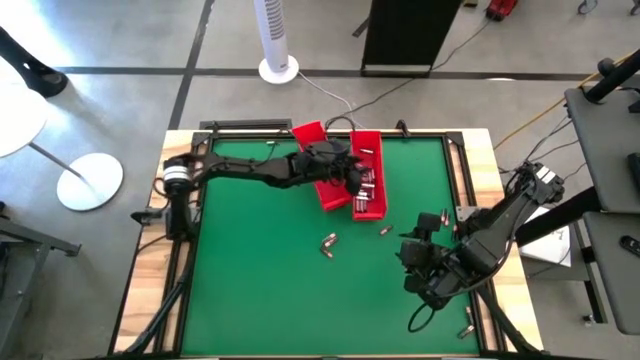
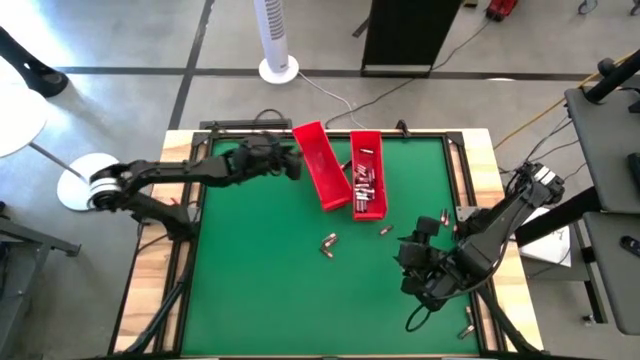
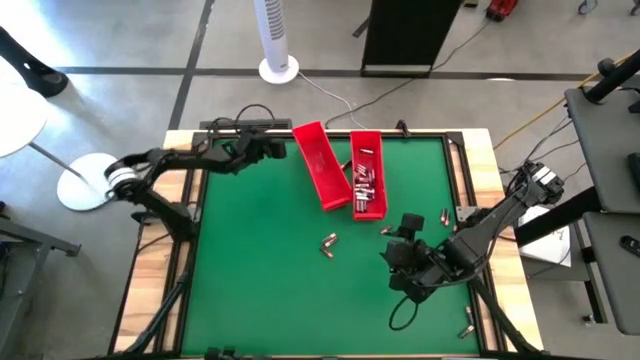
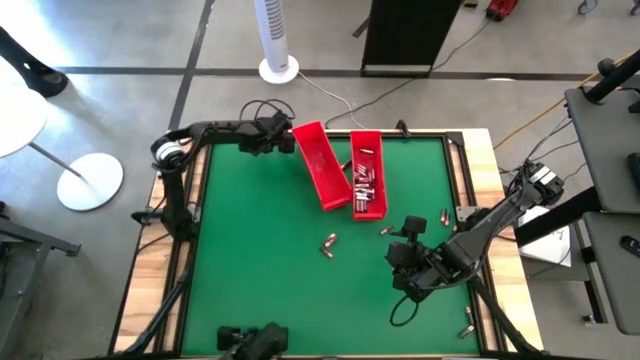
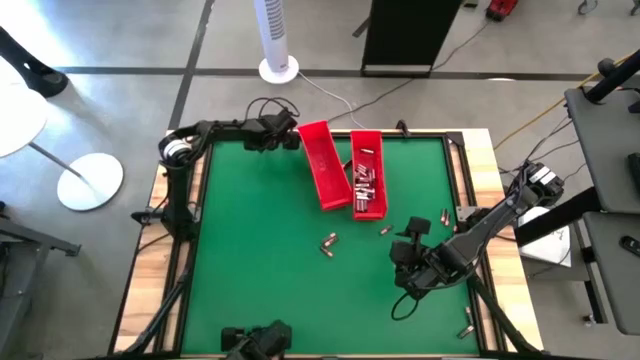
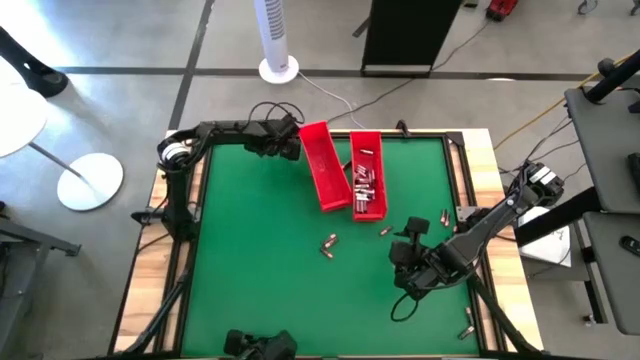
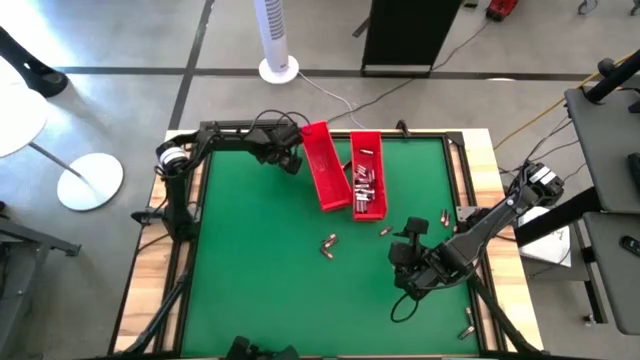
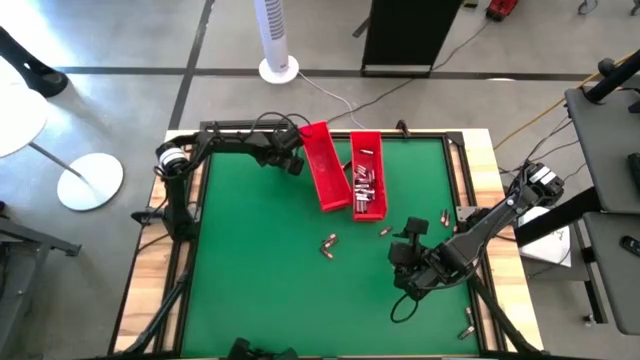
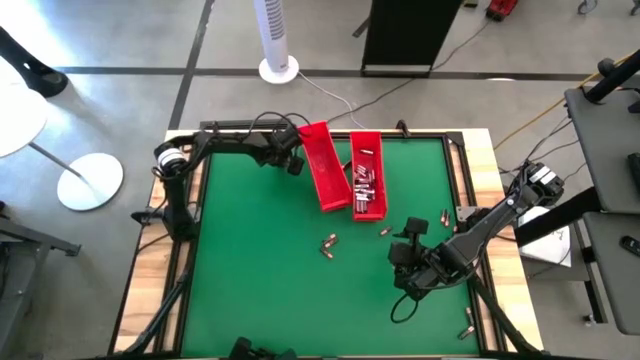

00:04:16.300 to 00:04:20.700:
Task: Sort batteries
Put the silver battery into the right red bin

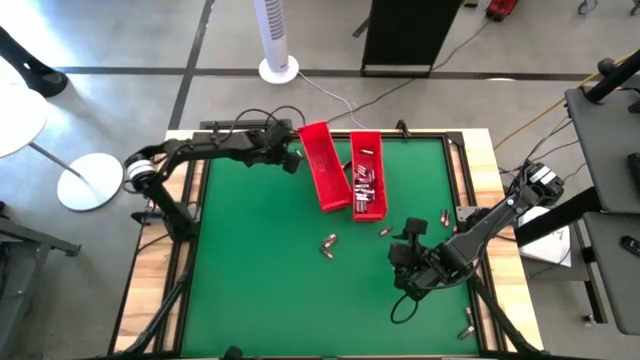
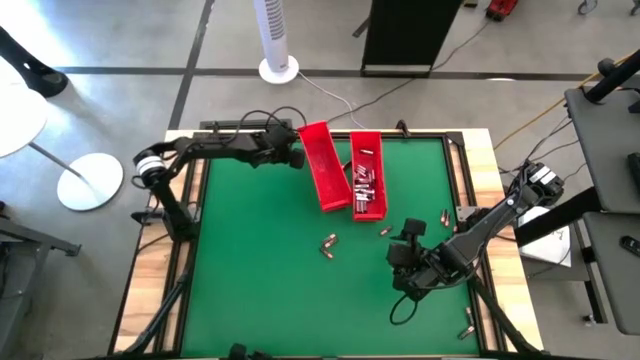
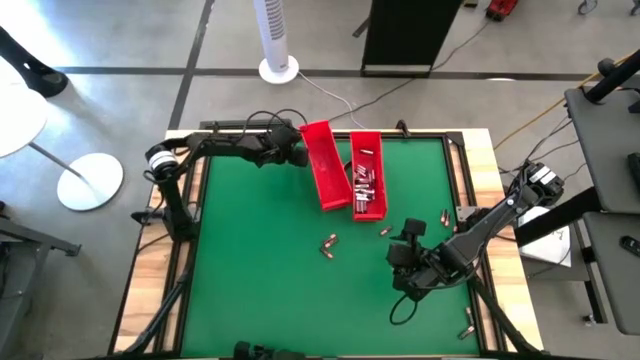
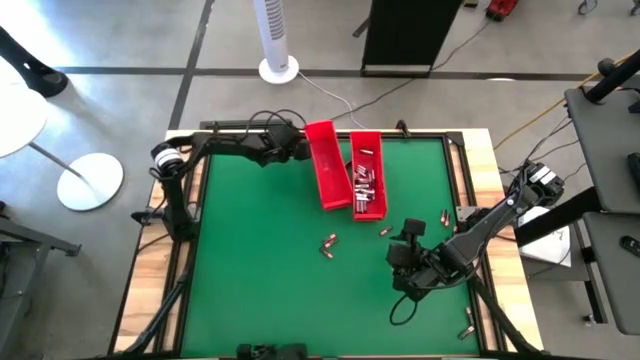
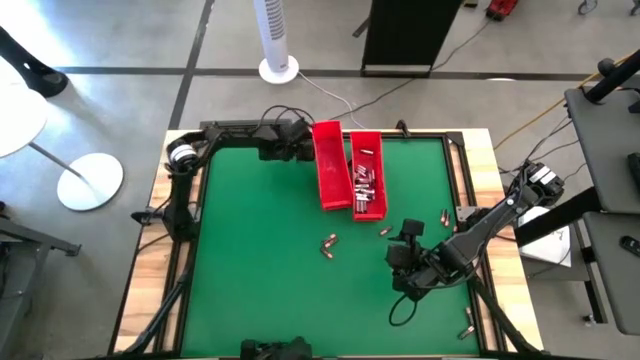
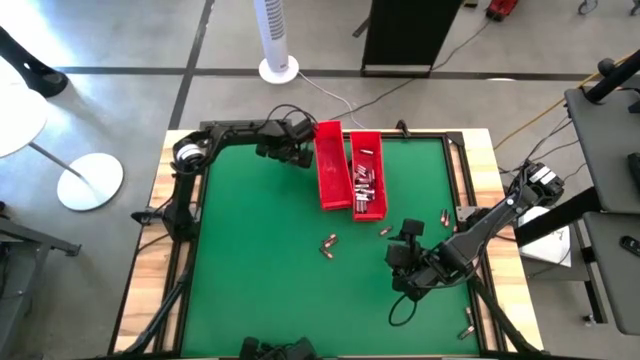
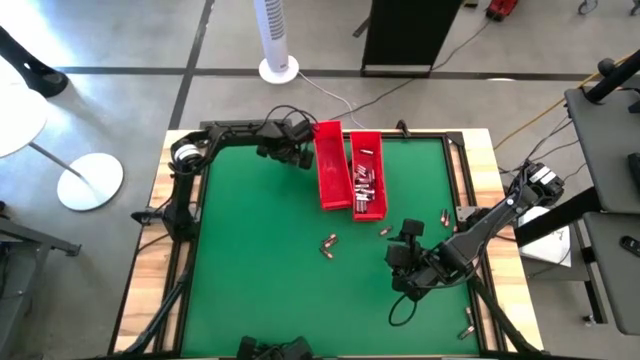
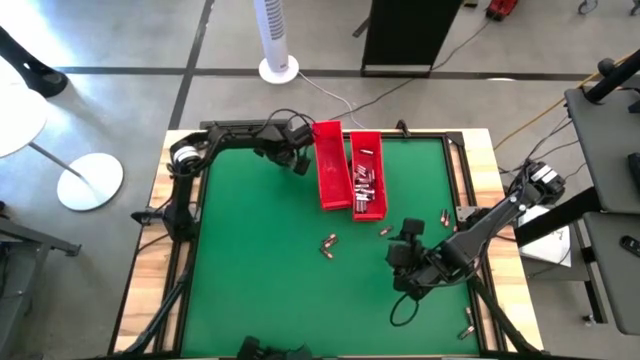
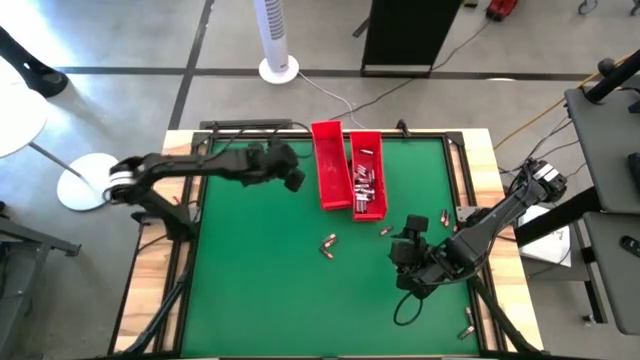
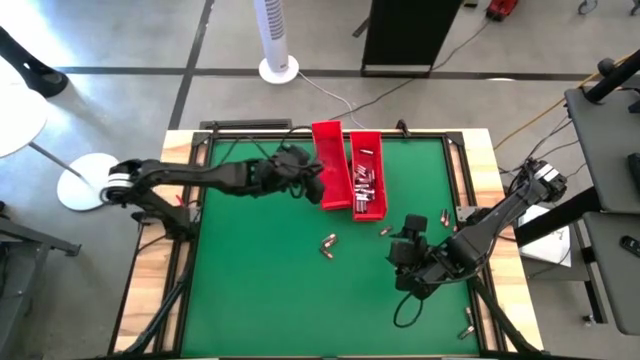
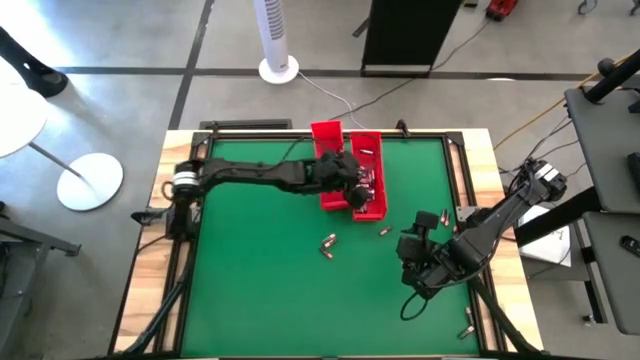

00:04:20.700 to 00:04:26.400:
Put the silver battery into the right red bin

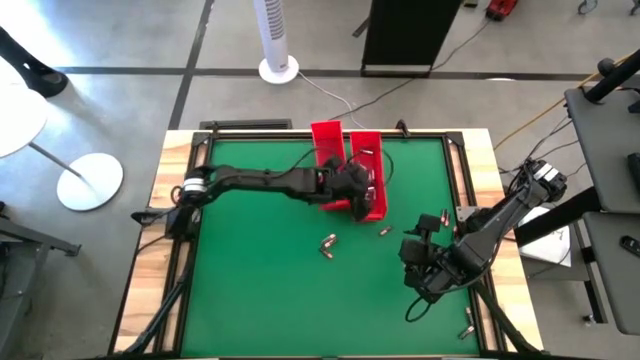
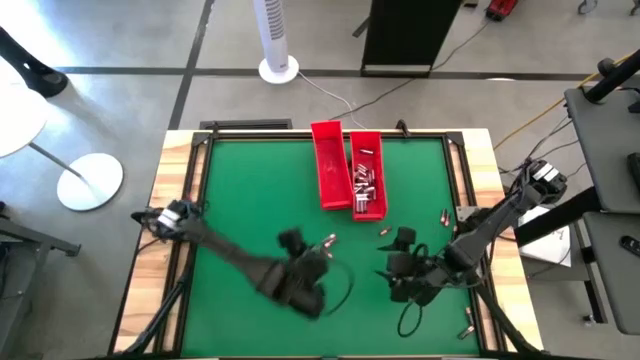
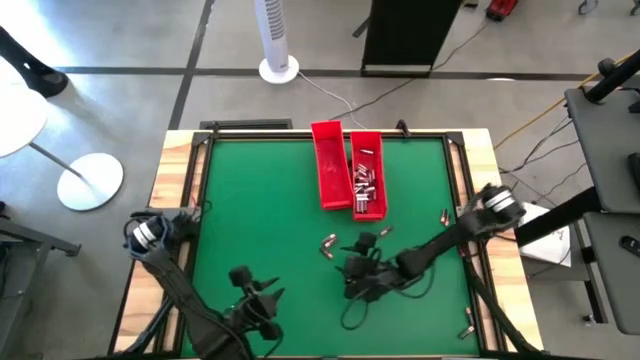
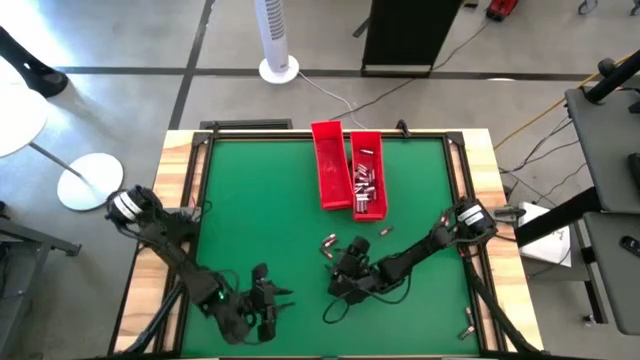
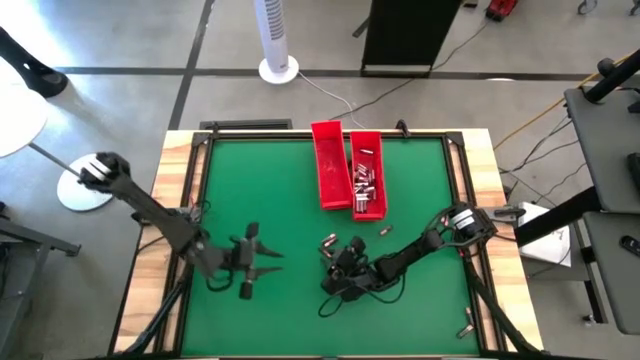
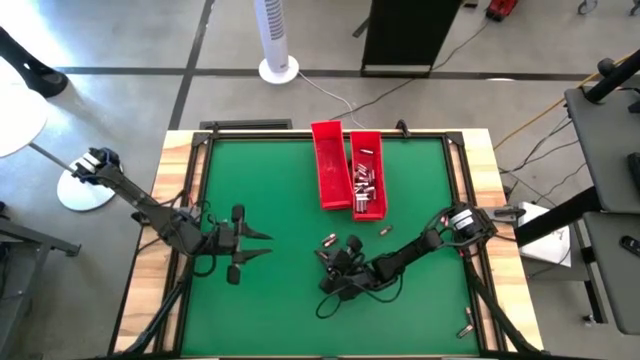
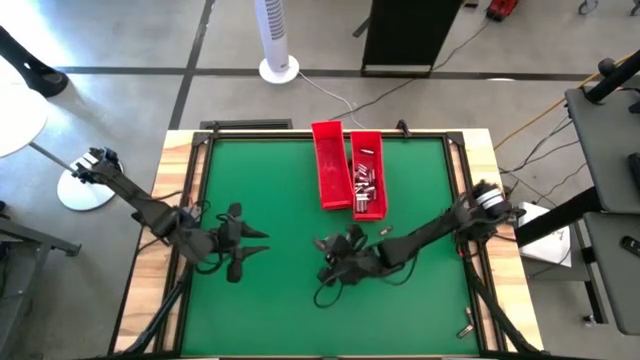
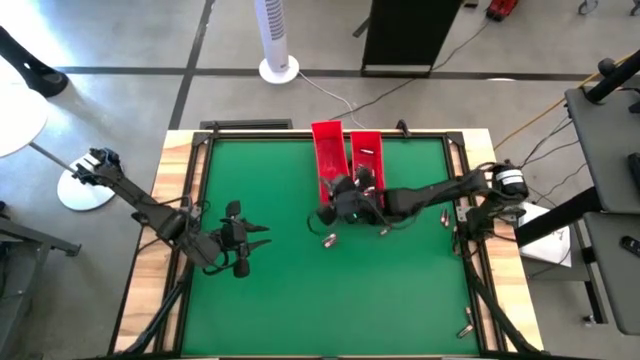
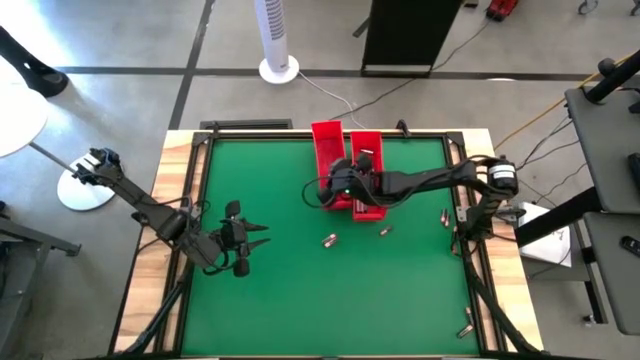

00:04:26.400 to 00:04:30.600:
Put the black battery into the left red bin

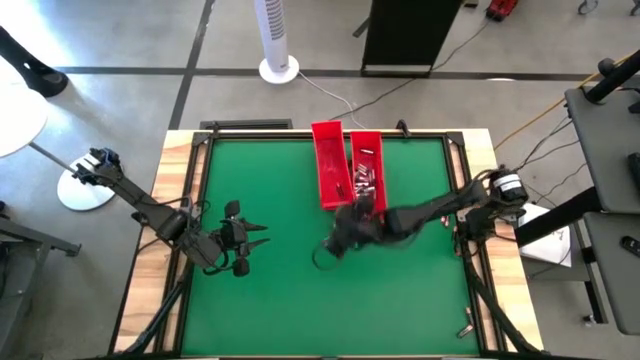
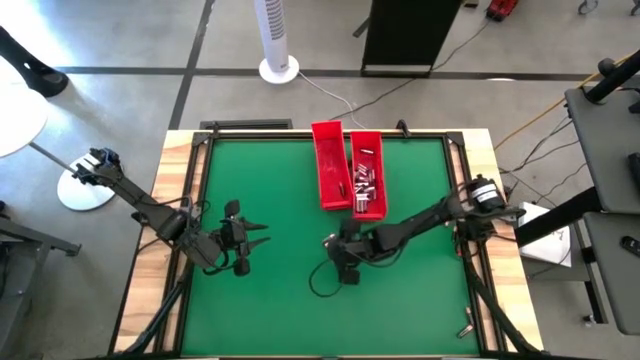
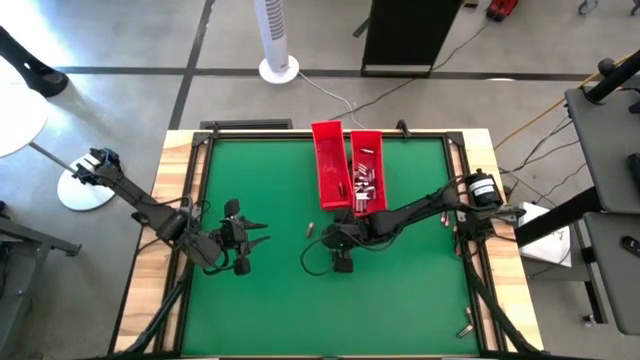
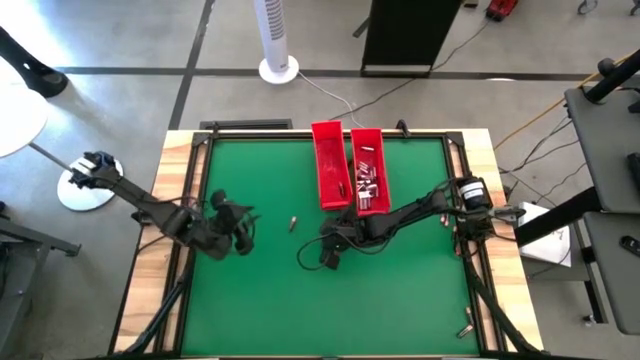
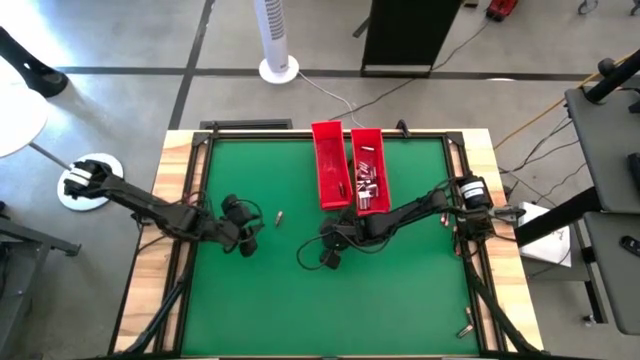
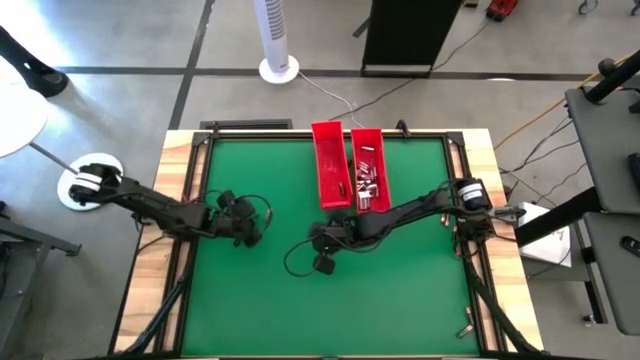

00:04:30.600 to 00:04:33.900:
Put the black battery into the left red bin

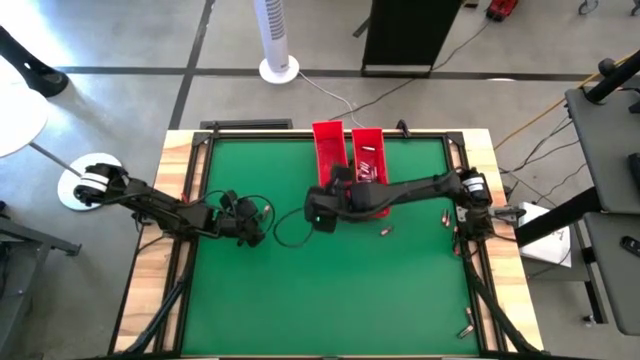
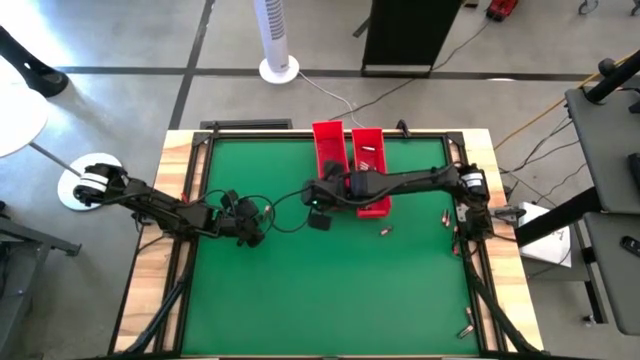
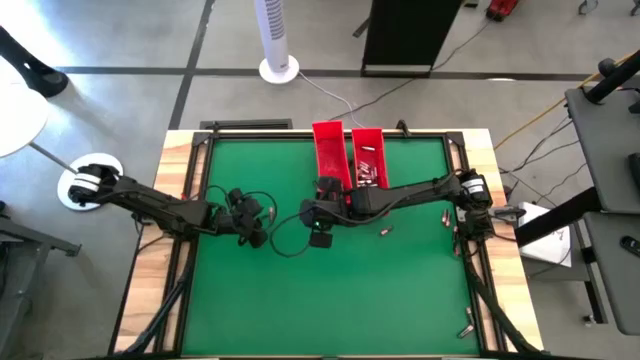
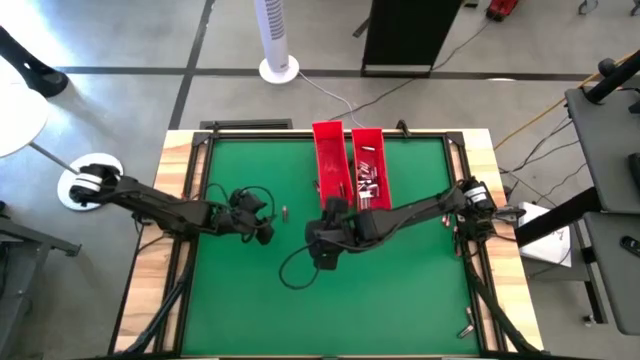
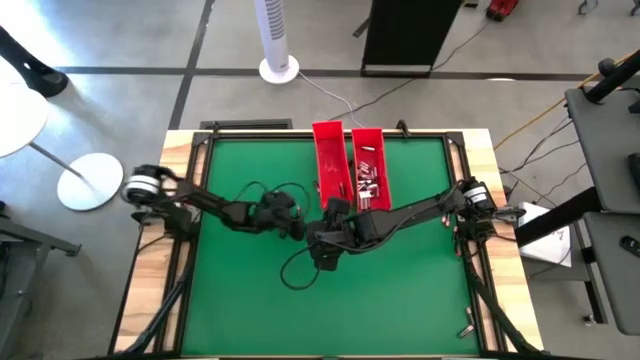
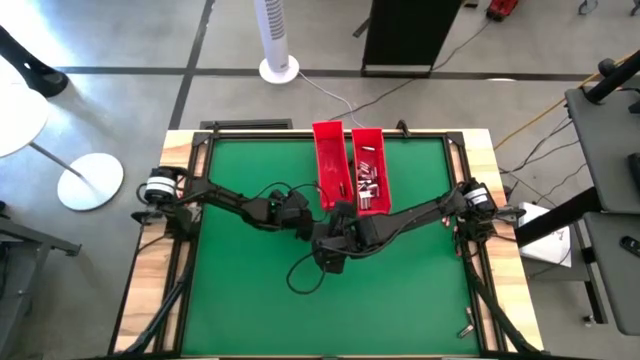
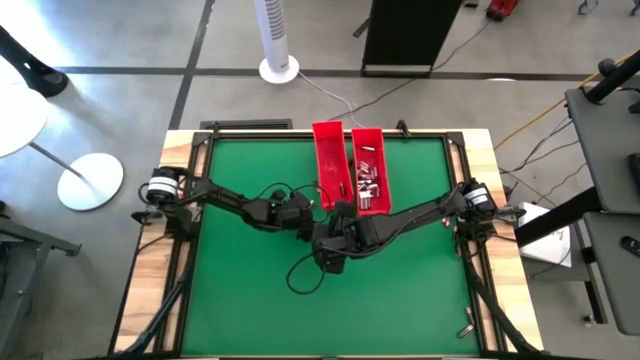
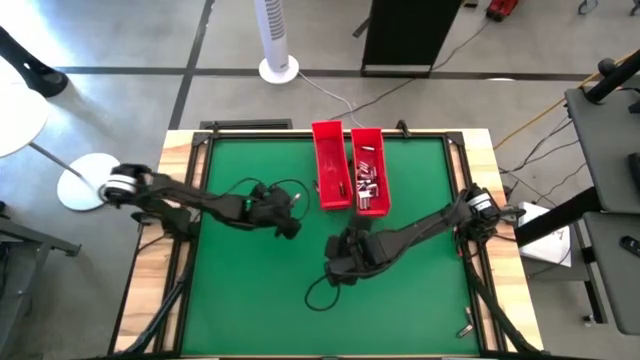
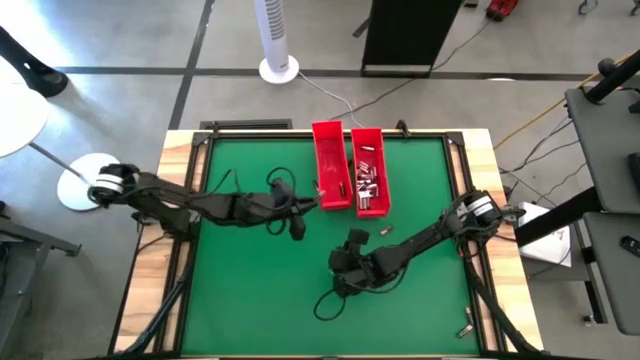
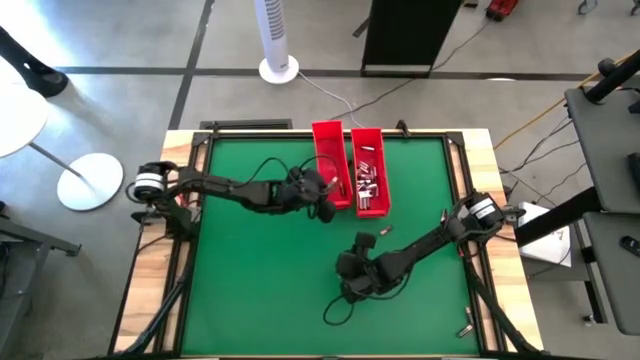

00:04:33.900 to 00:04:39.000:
Put the black battery into the left red bin
